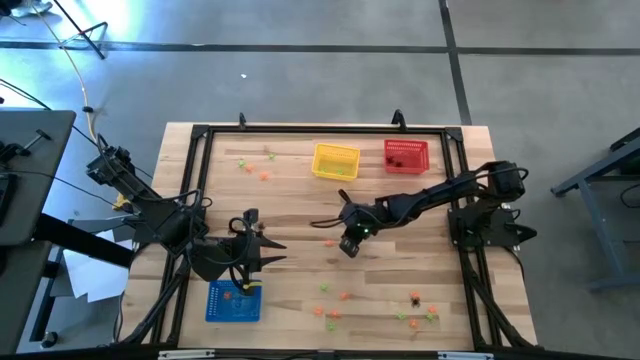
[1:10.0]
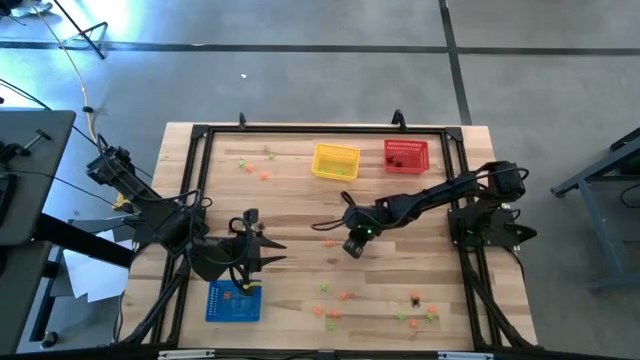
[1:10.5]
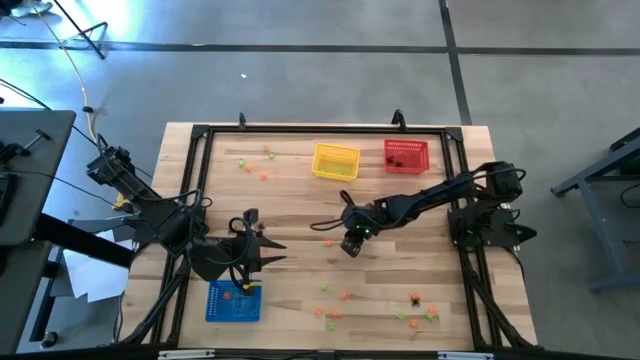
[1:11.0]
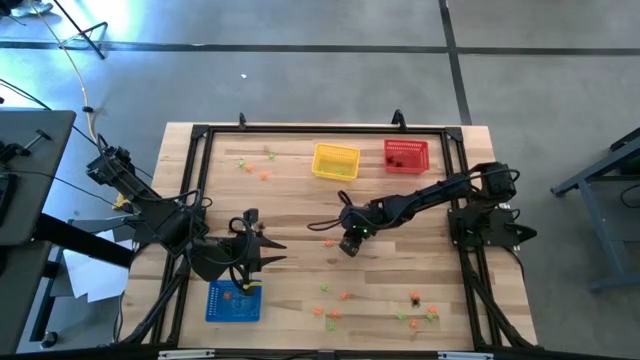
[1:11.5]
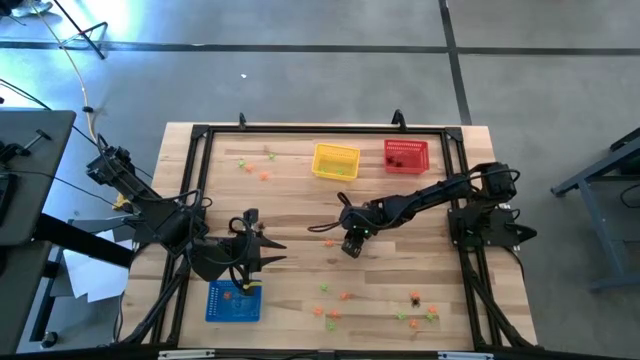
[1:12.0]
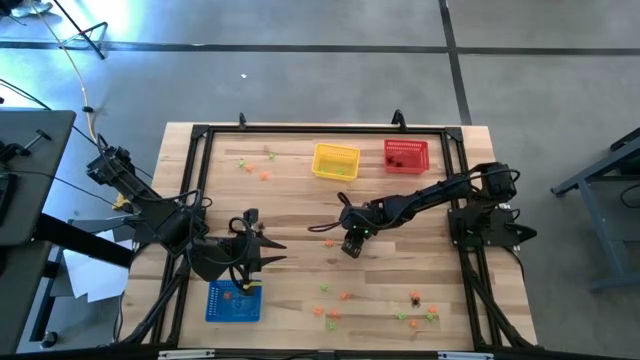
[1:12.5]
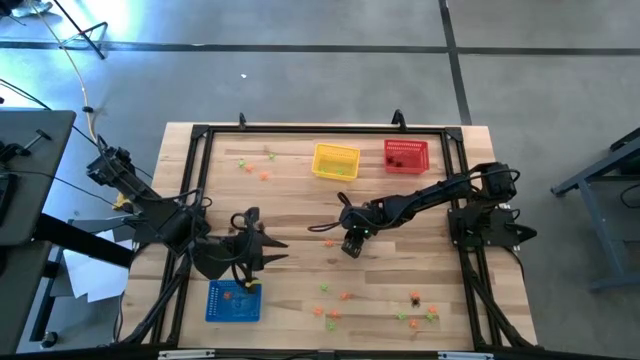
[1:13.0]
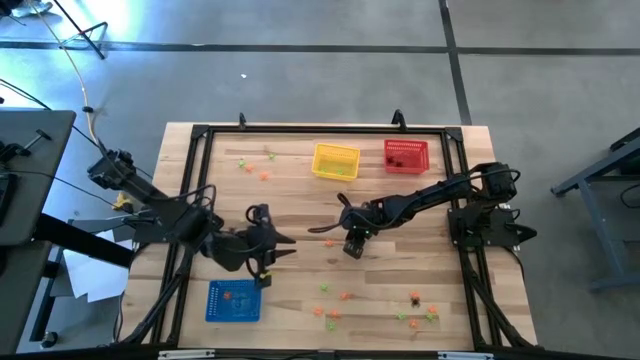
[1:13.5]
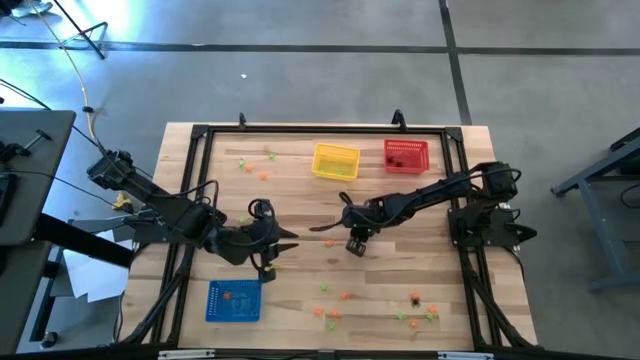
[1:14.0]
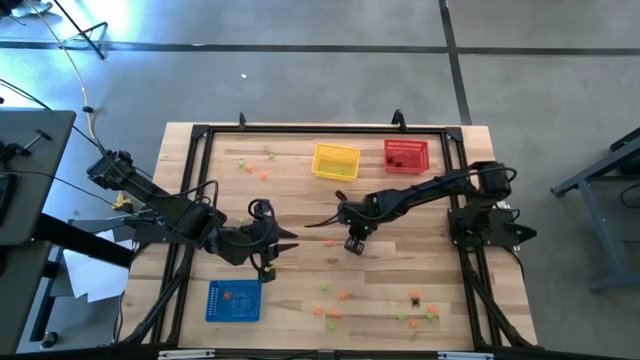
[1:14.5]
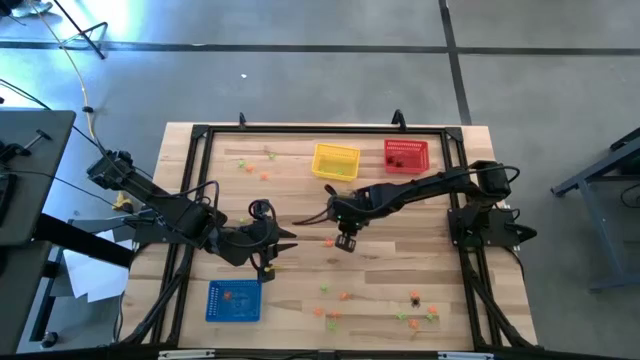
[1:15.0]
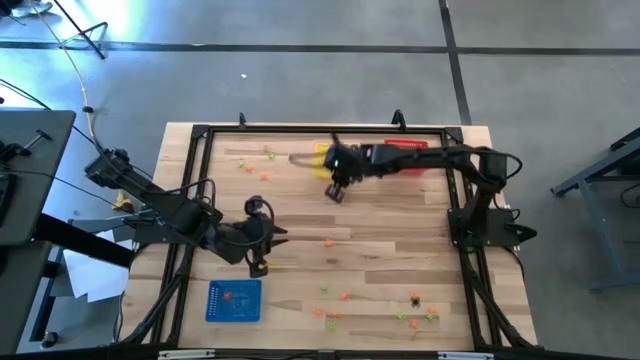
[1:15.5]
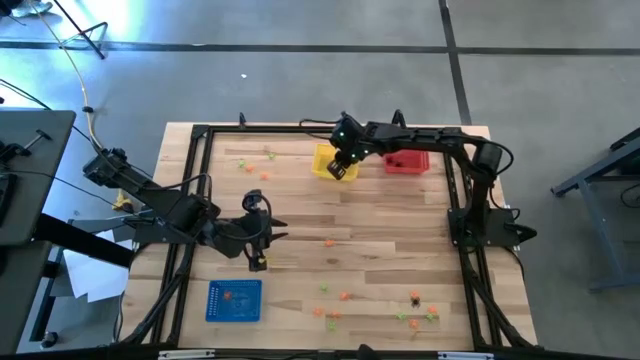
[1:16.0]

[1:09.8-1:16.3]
Task: Sort Halloween decoration
Put the spider toy into the yellow bin

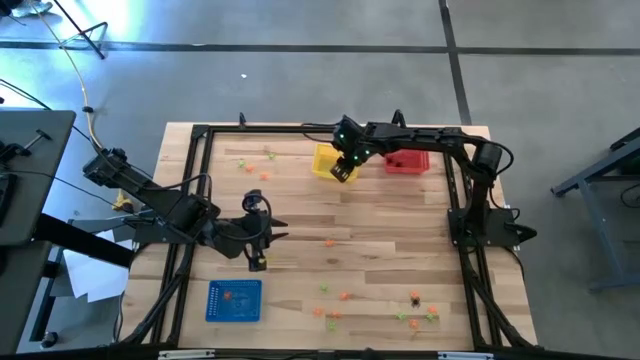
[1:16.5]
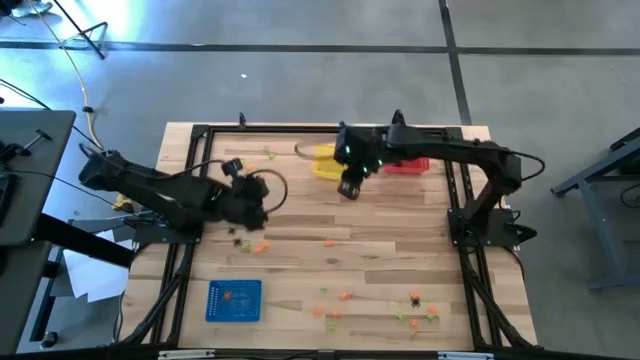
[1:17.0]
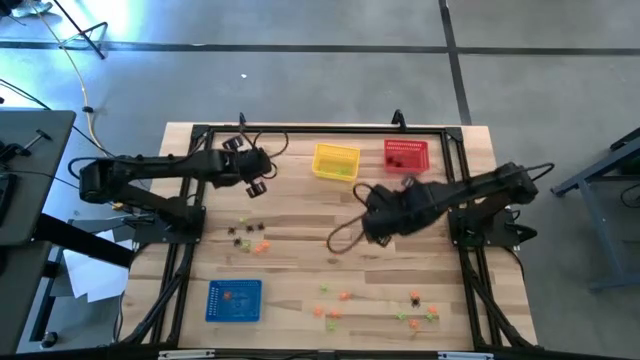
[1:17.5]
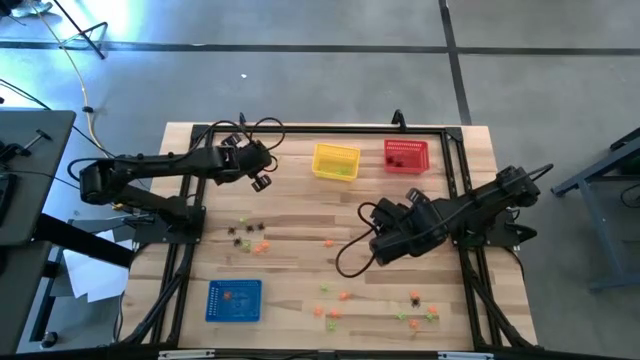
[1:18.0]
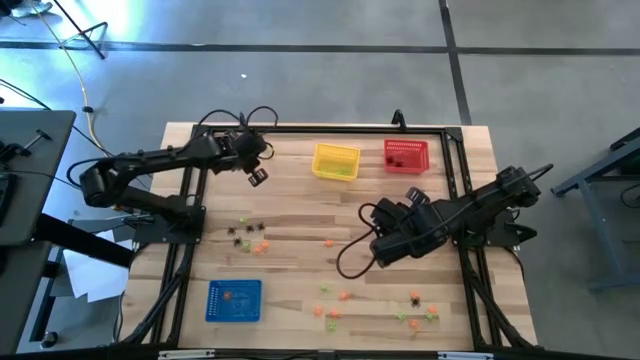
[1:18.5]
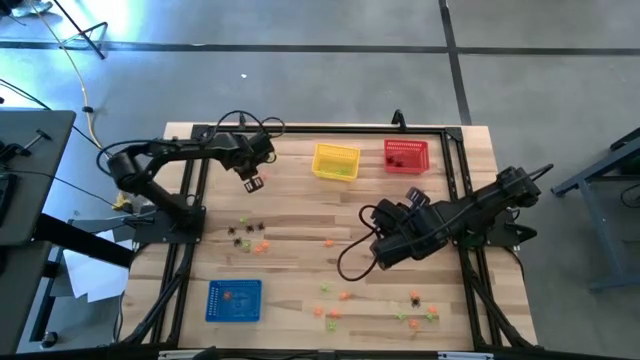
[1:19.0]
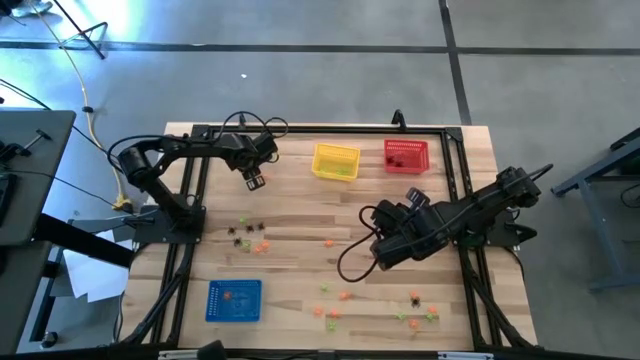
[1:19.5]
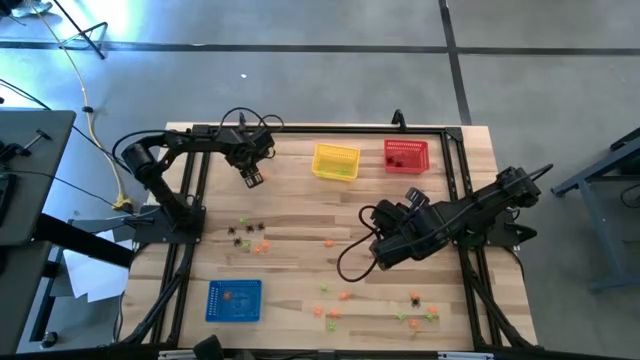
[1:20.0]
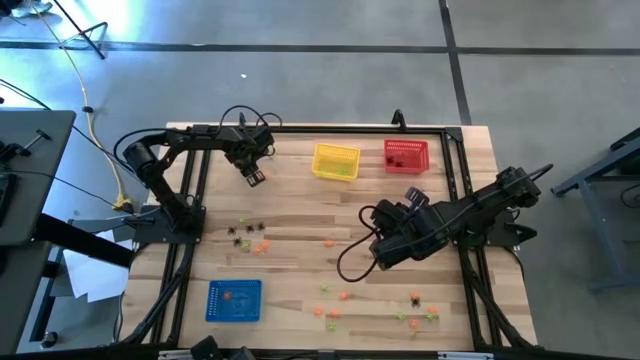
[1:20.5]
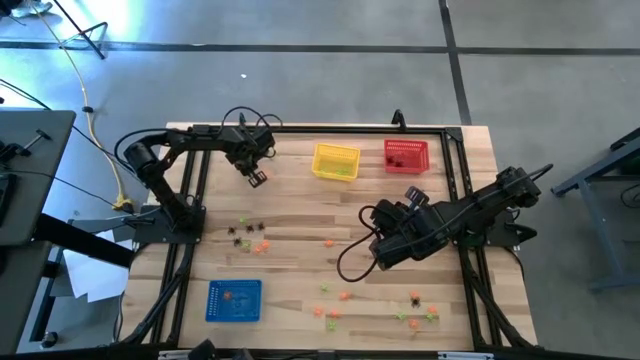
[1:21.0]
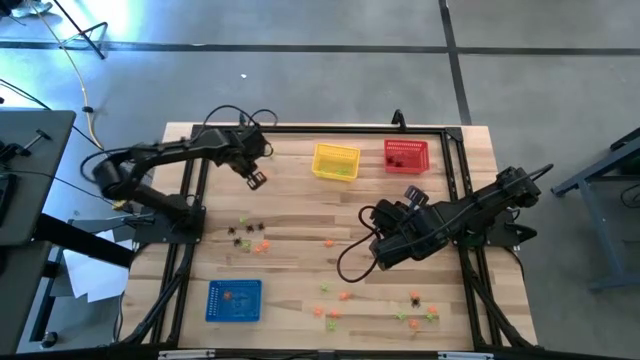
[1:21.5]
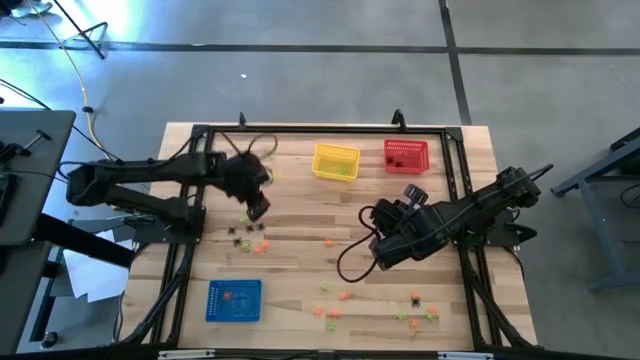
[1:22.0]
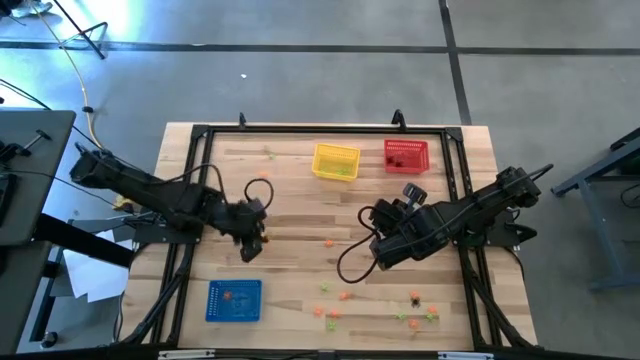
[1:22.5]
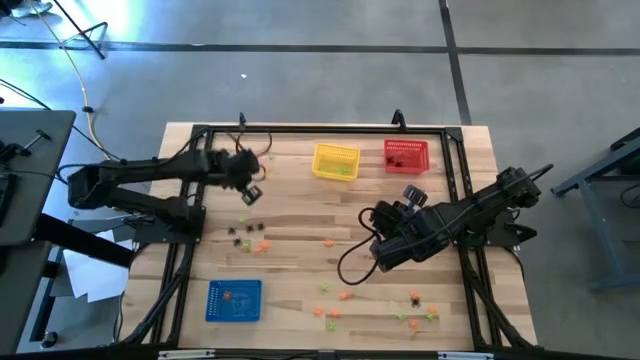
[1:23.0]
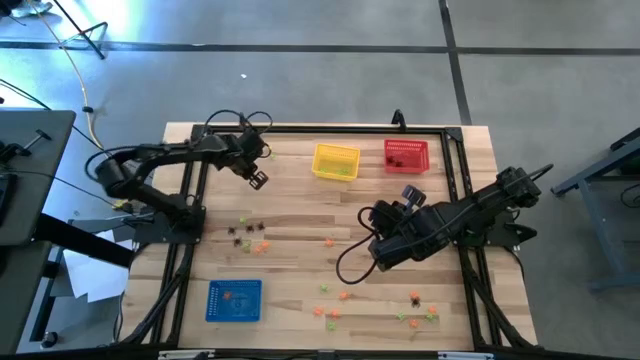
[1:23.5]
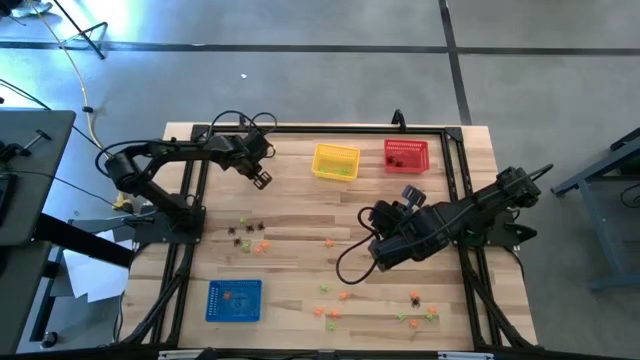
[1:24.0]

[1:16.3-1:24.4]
Put the orange spider toy into the blue bin

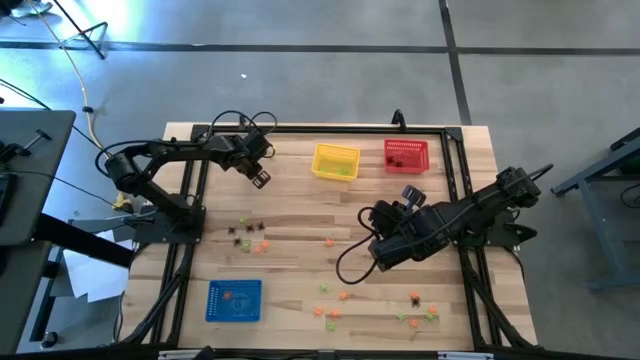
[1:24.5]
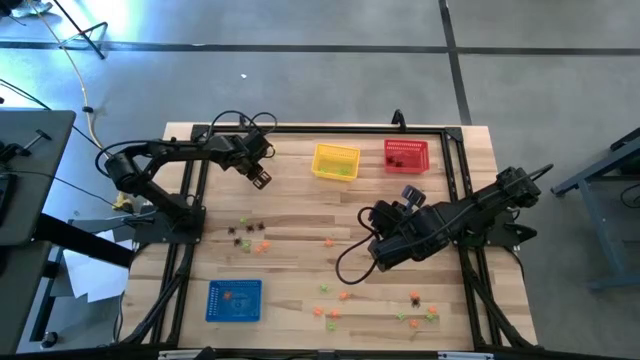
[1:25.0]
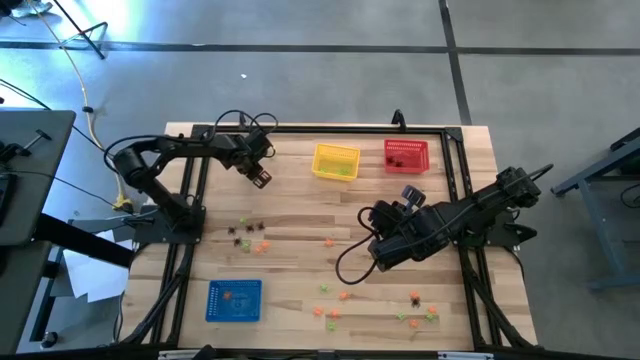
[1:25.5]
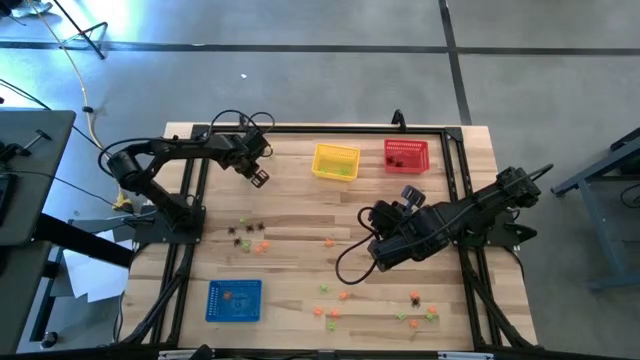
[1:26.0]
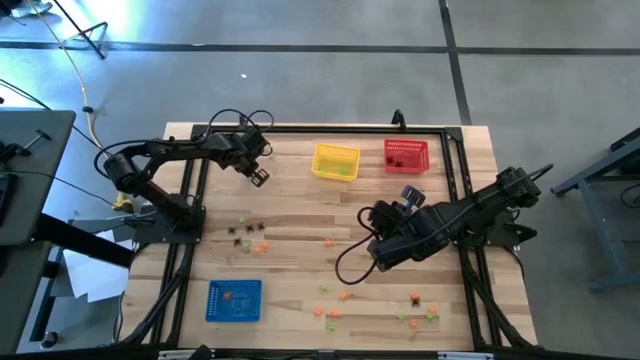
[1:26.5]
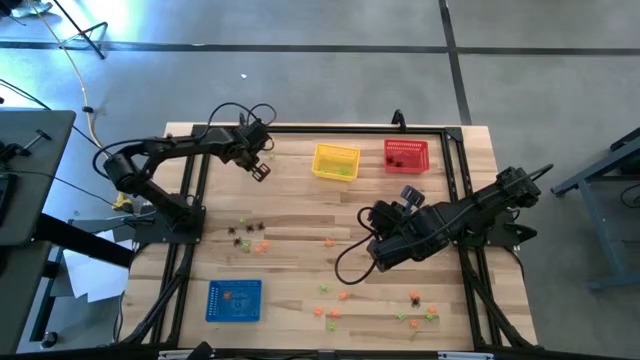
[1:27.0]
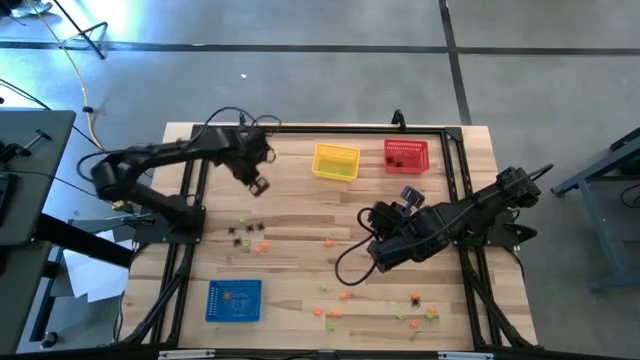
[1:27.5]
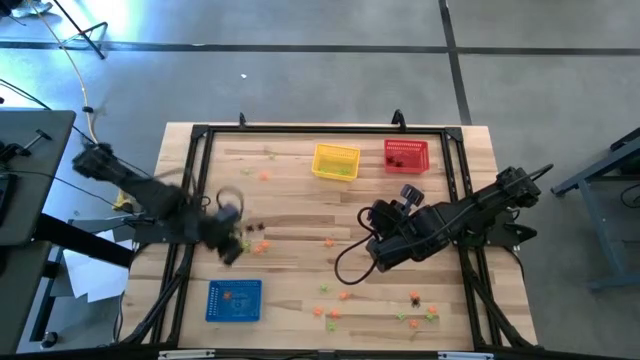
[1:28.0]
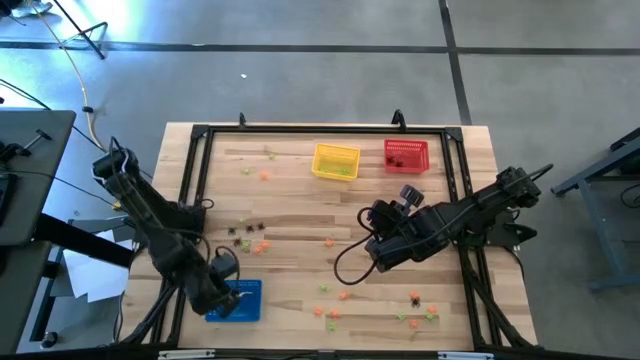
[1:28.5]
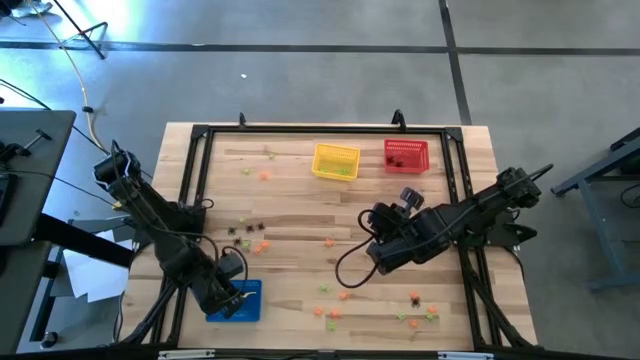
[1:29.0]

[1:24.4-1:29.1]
Put the orange spider toy into the blue bin

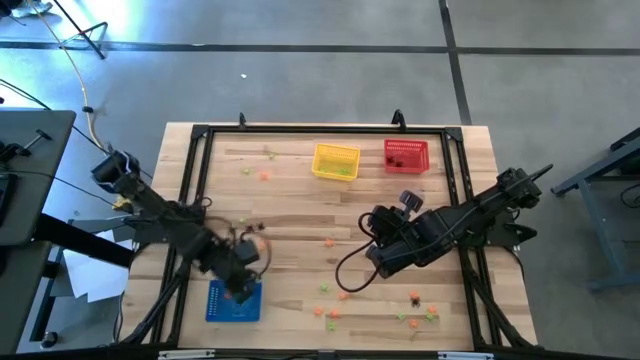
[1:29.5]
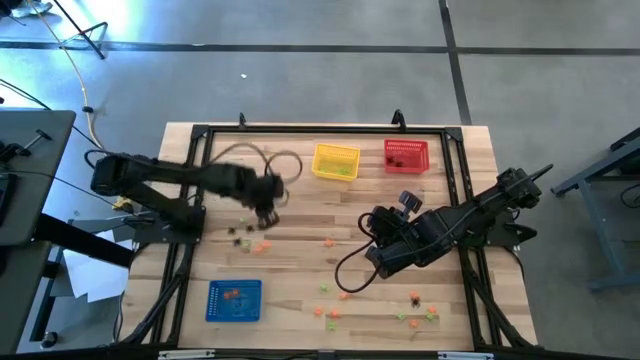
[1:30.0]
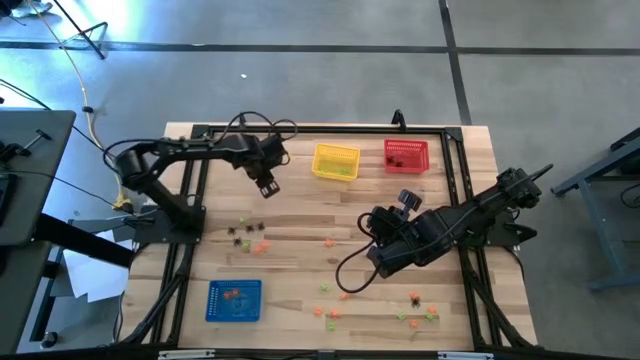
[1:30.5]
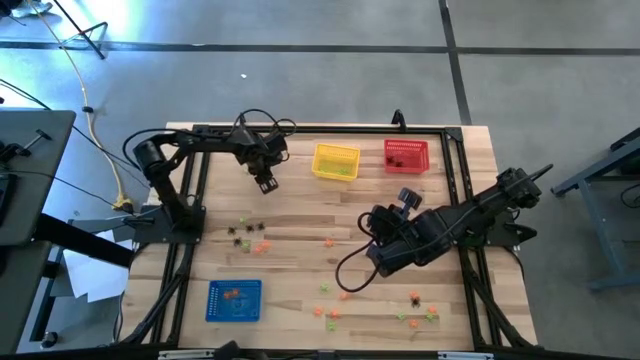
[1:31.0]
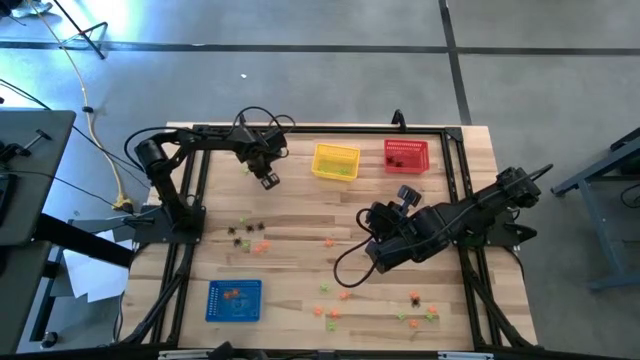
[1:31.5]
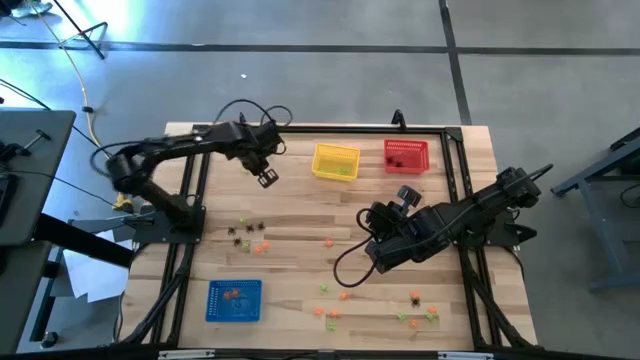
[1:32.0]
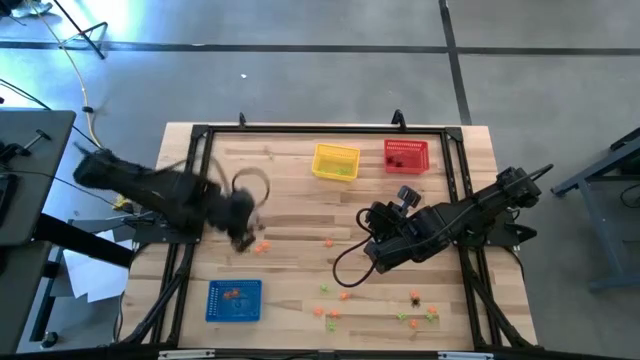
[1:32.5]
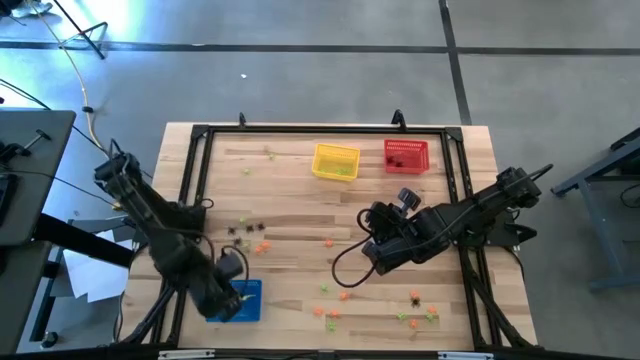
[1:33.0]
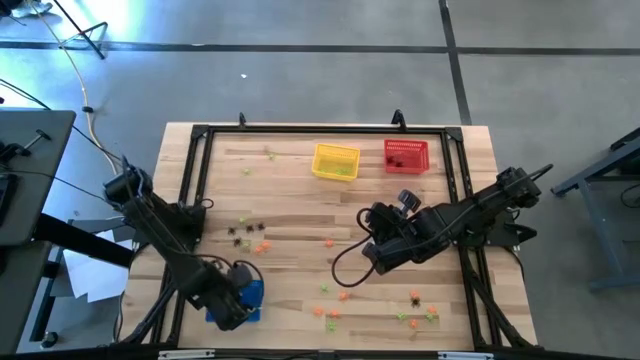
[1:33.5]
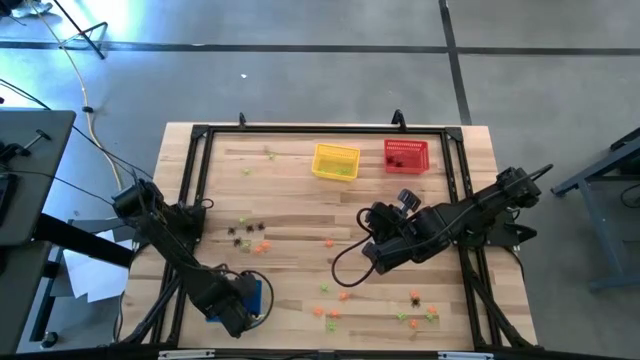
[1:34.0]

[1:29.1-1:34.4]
Put the orange spider toy into the blue bin
